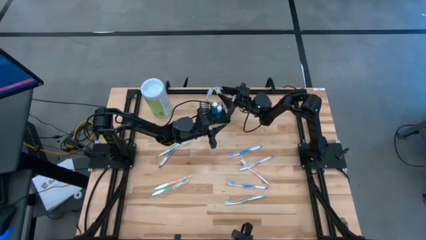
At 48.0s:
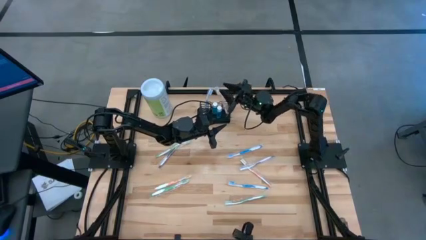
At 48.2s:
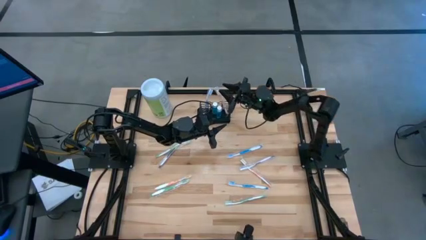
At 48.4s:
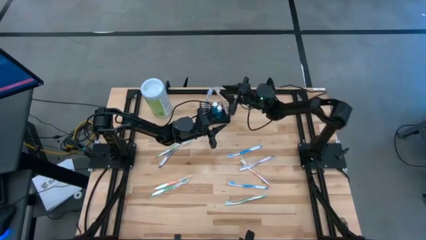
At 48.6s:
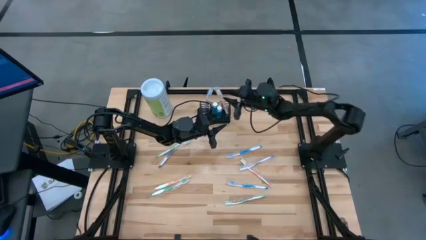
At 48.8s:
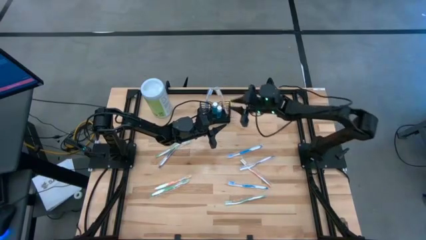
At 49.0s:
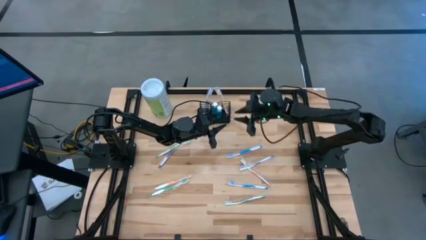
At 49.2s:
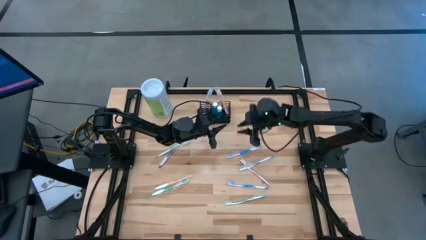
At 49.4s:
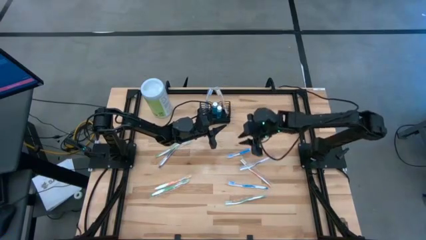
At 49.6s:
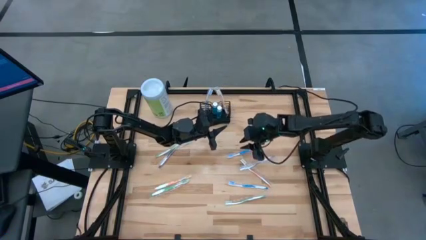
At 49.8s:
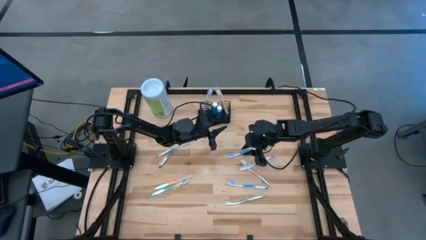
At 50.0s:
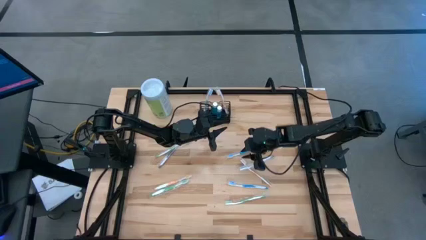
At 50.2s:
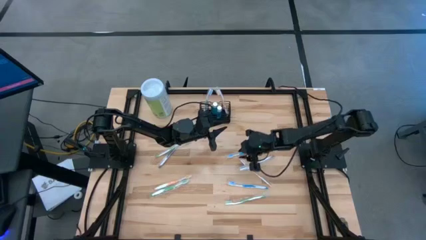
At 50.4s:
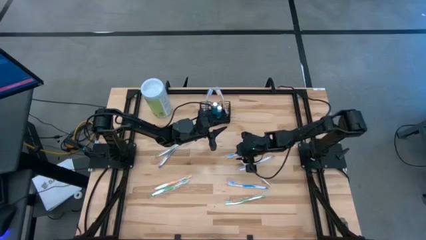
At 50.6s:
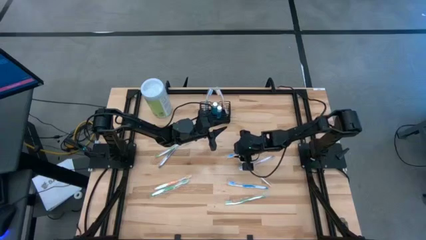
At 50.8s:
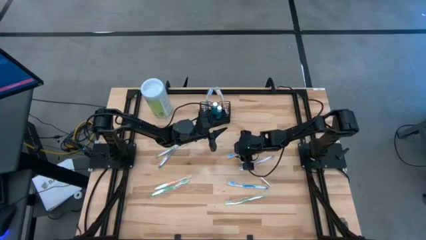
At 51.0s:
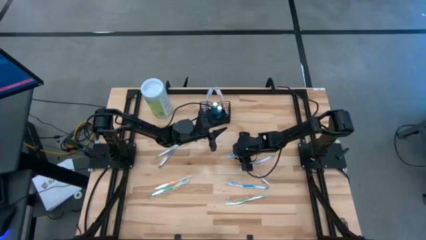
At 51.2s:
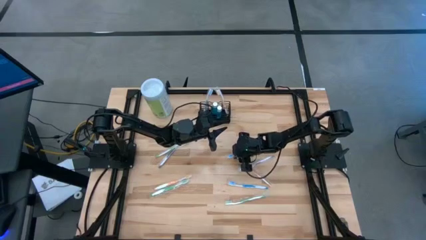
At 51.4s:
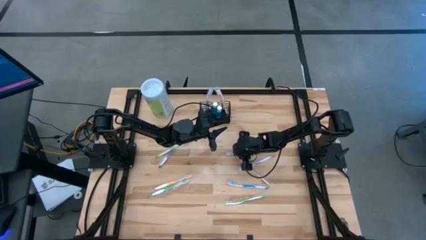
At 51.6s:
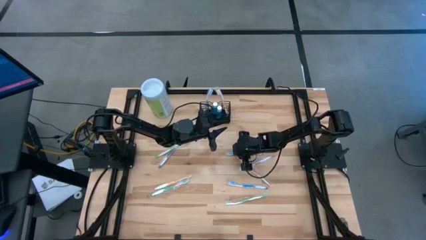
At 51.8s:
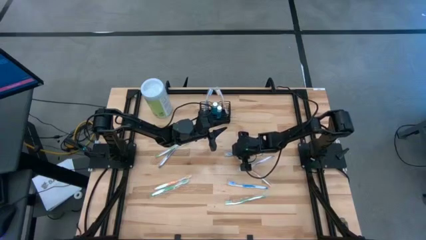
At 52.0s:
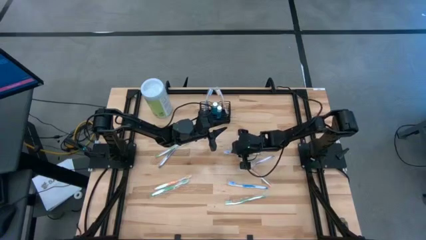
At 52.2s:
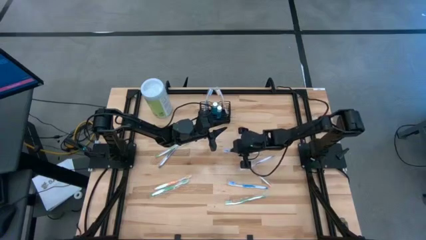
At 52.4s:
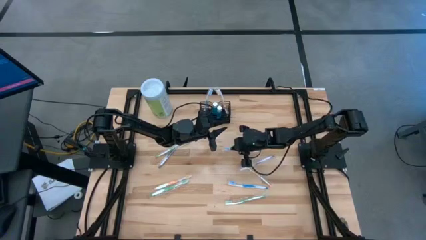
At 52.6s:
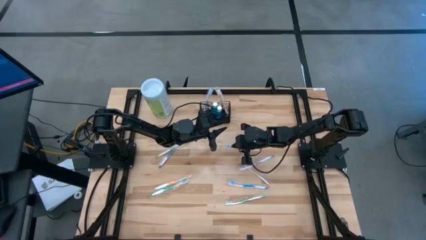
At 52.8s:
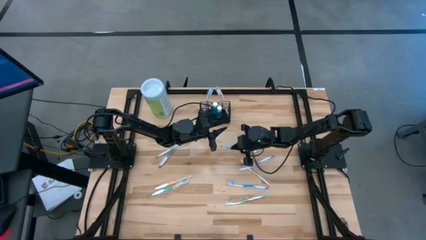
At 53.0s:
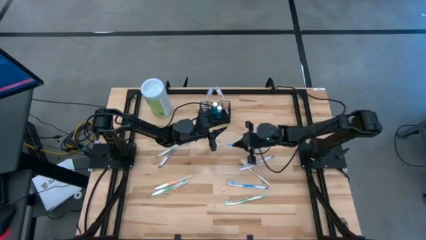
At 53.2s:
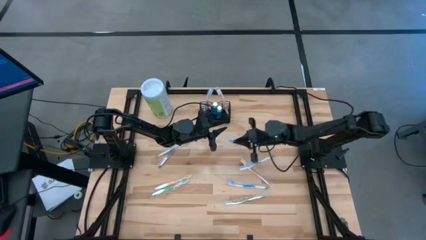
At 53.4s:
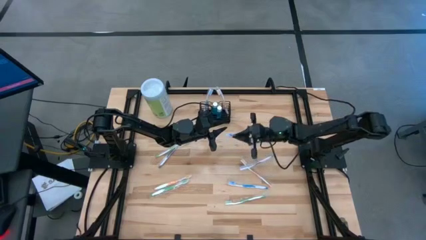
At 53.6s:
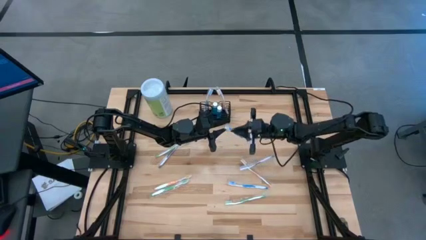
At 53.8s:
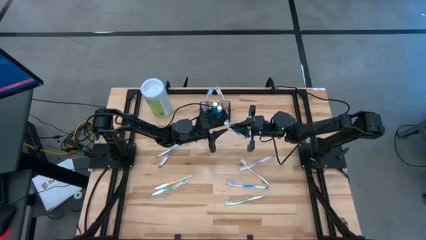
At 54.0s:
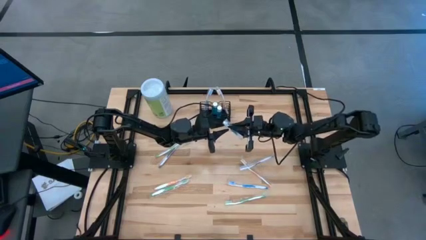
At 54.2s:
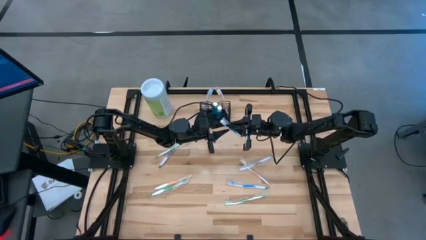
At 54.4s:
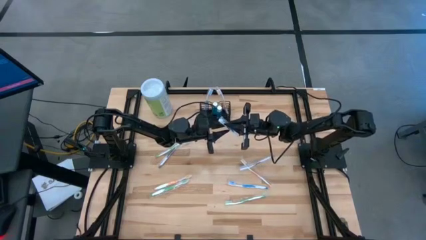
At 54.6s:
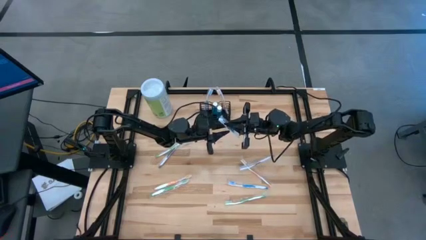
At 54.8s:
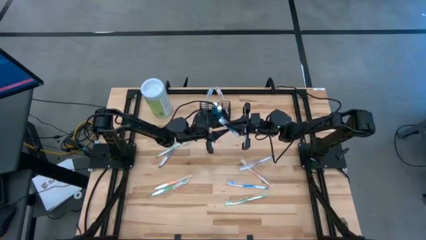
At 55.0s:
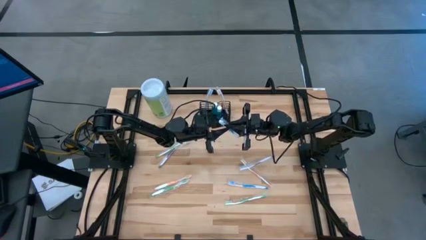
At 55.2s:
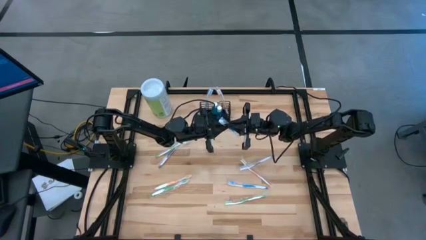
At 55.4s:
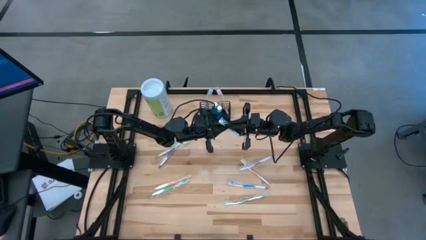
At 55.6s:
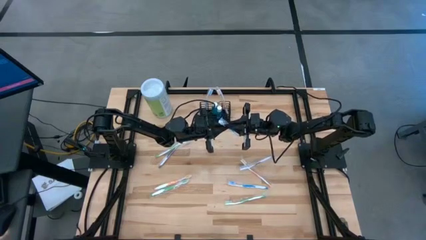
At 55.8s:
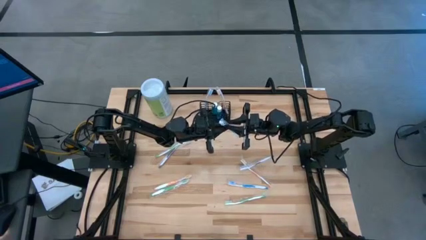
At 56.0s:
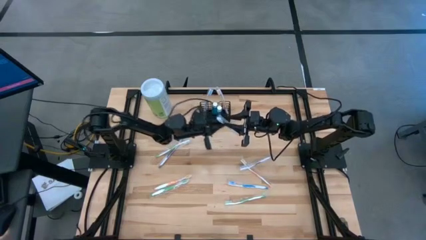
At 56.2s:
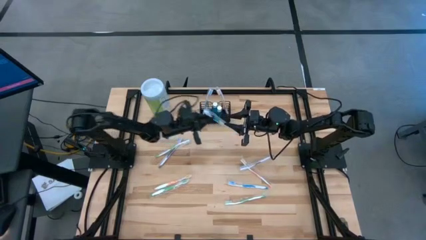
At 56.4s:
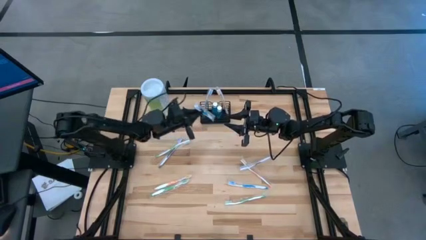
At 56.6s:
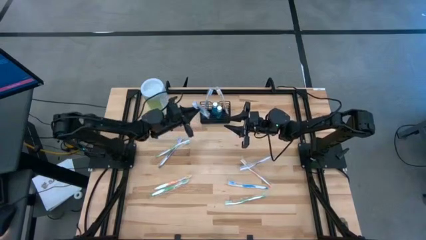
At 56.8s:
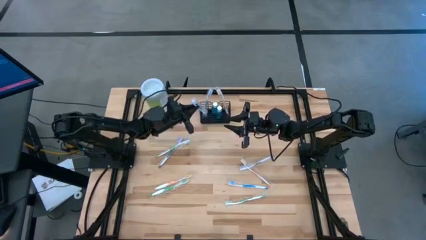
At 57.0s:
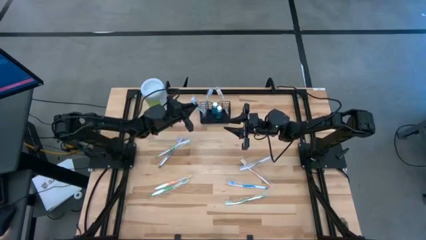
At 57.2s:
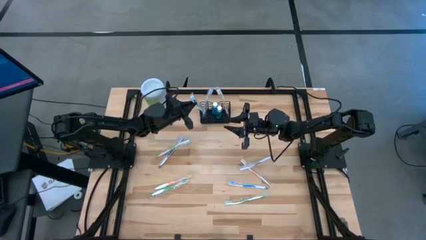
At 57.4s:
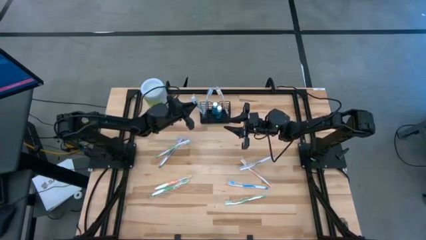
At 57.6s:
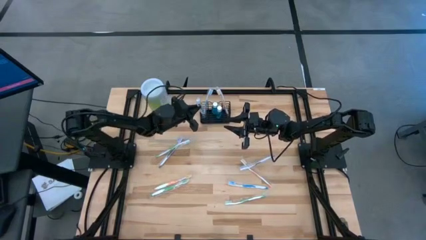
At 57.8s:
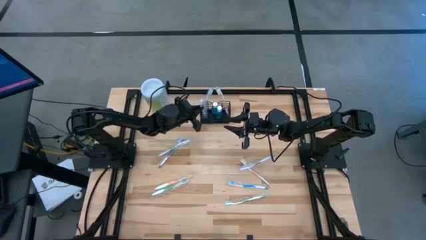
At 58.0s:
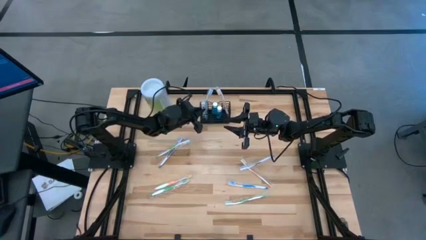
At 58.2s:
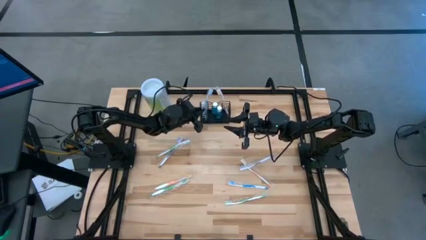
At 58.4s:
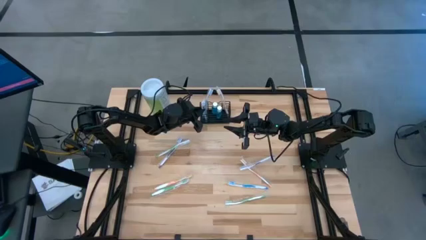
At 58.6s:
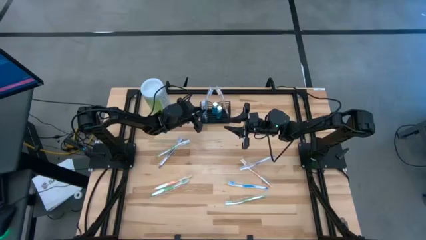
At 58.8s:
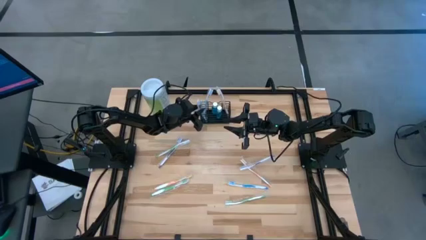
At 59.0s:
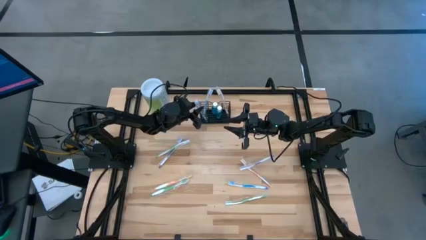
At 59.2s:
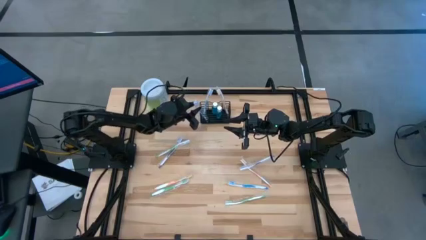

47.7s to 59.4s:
Task: Pick & Place toothbrushing station
Put the blue toothbrush into the black wire organizer
